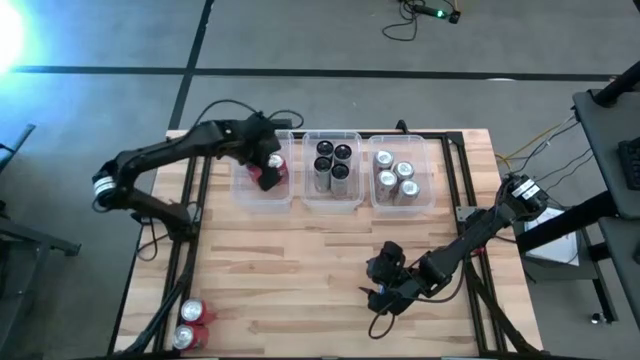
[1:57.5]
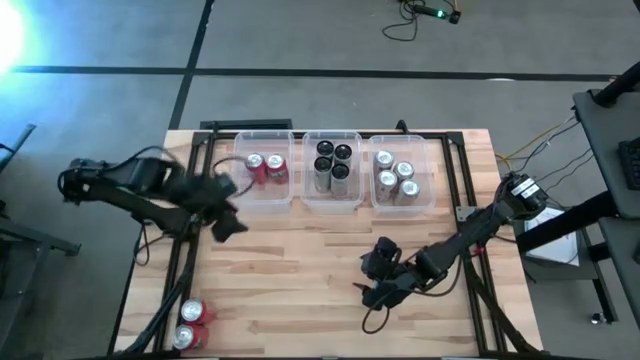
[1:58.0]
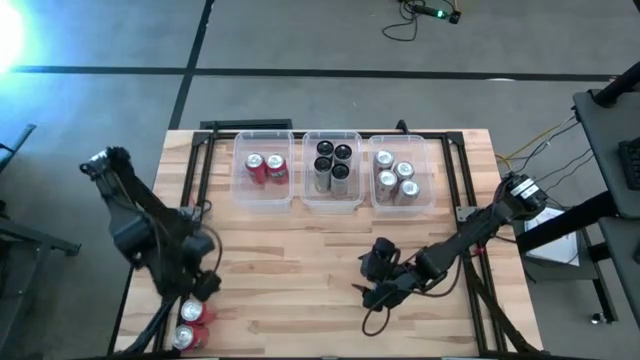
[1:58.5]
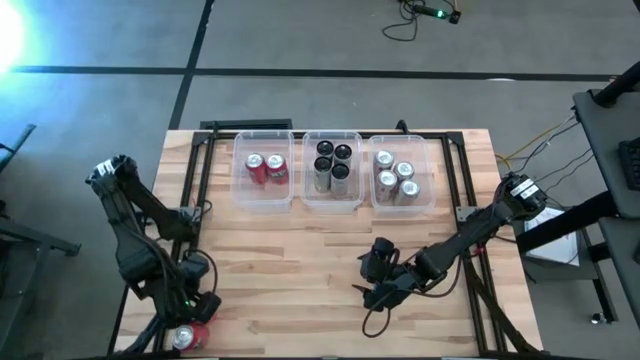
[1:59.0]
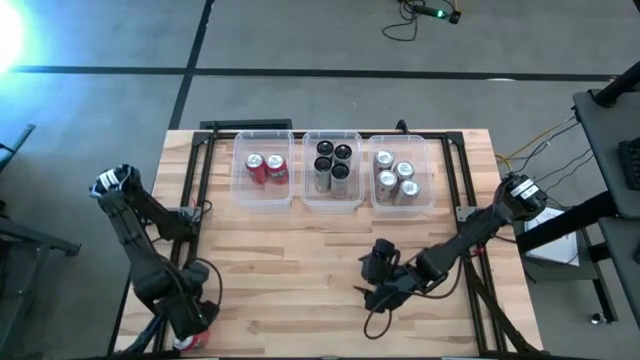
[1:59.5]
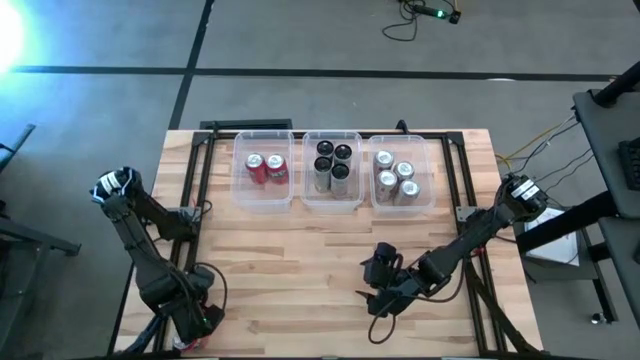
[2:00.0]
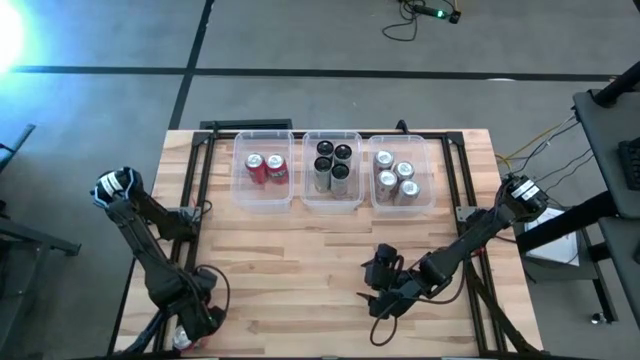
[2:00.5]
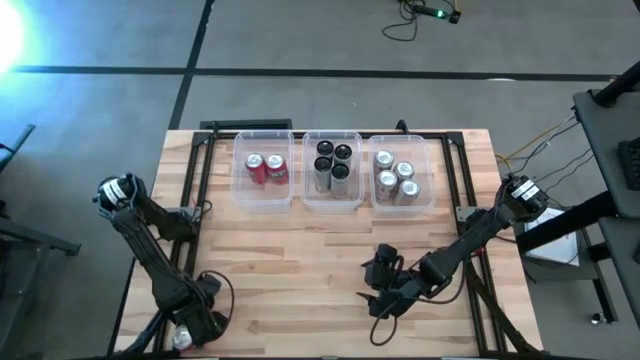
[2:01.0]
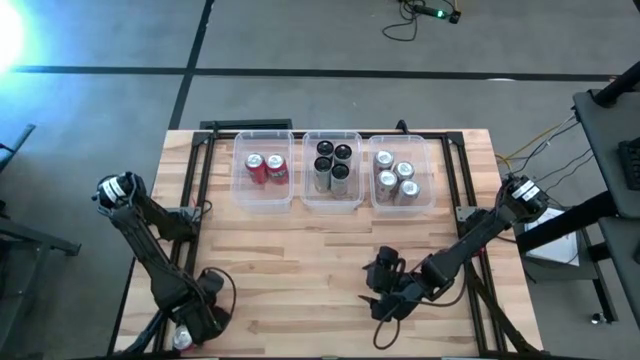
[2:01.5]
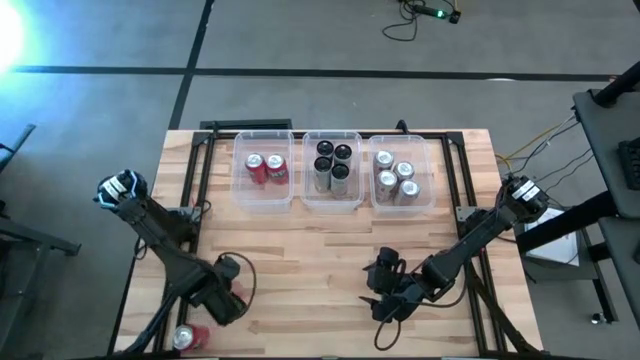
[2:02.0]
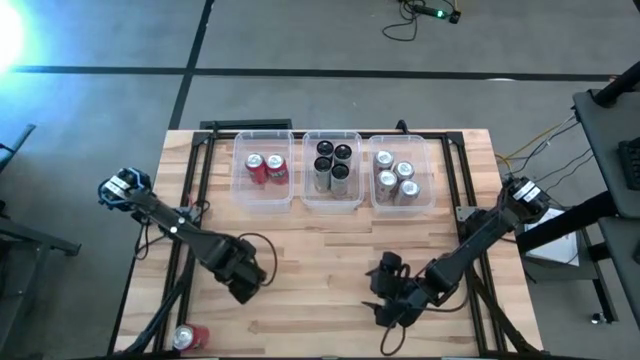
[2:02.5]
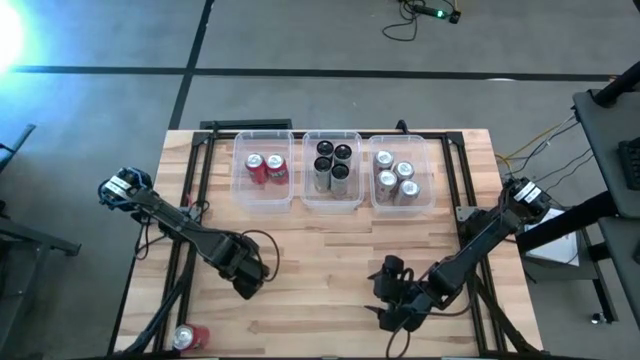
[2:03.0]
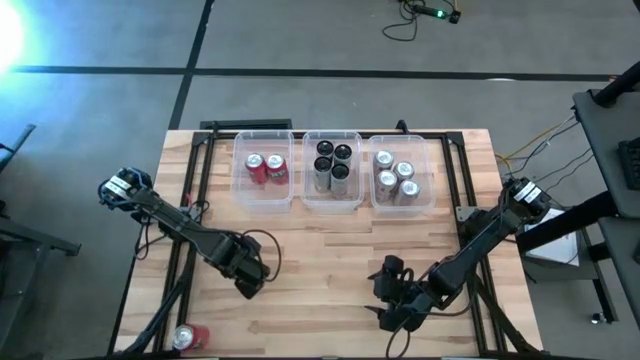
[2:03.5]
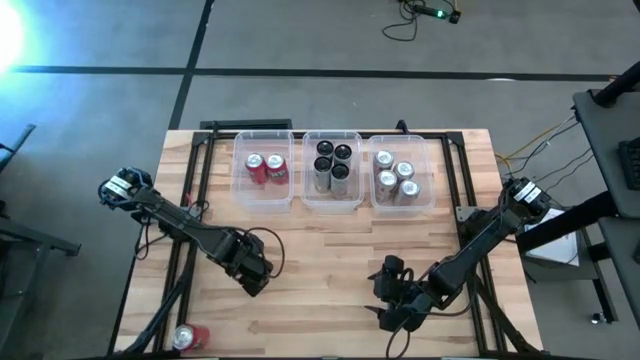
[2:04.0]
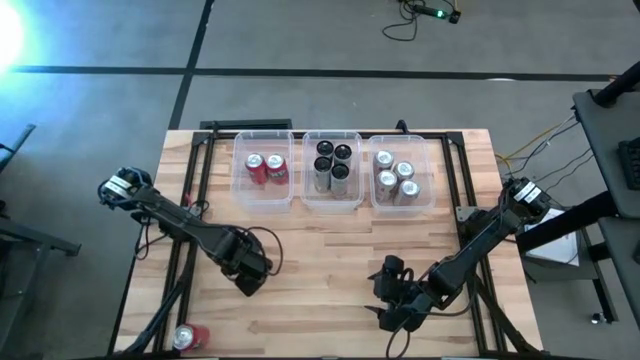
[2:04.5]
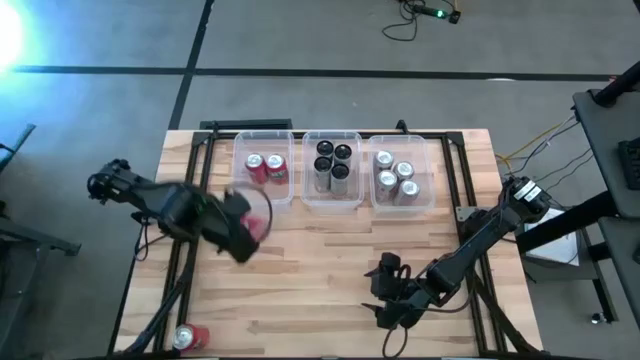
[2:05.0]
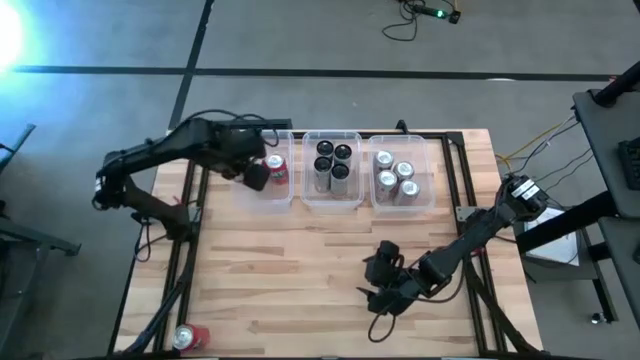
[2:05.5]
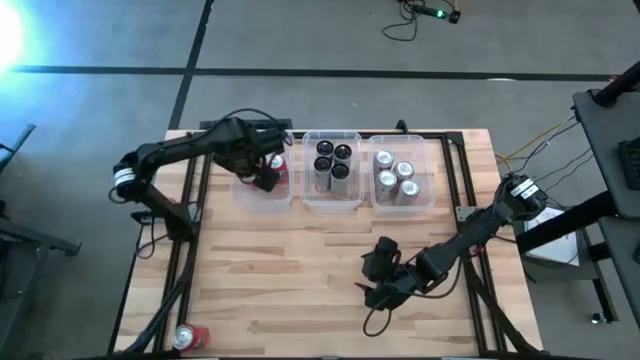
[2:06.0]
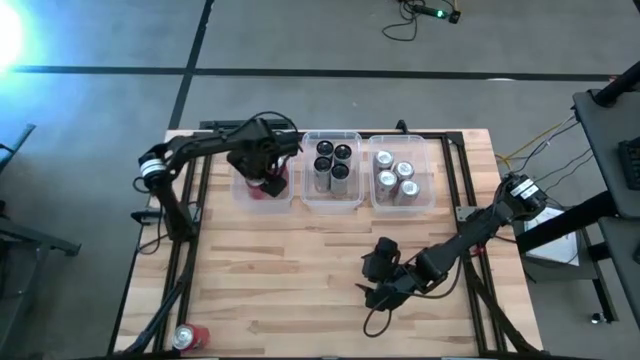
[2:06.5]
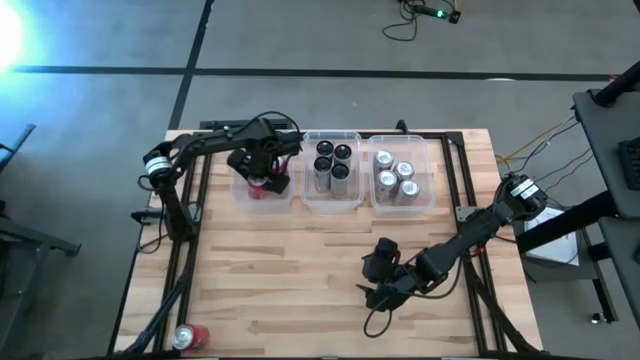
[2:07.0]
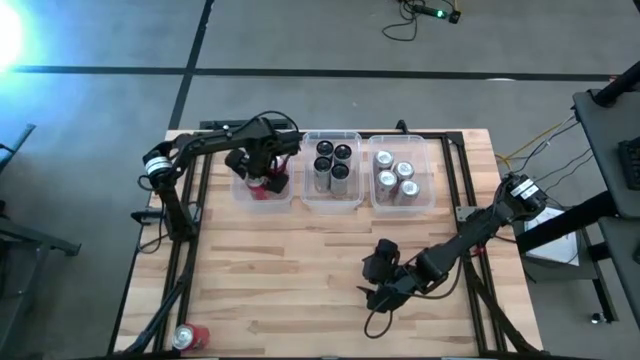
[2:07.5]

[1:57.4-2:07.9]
Task: Sort soda cans
Put the red soda can into the left transparent bin

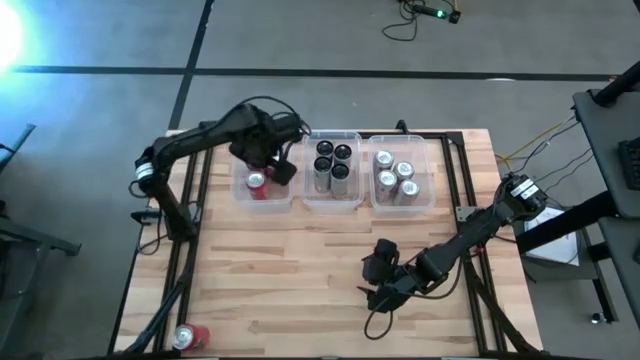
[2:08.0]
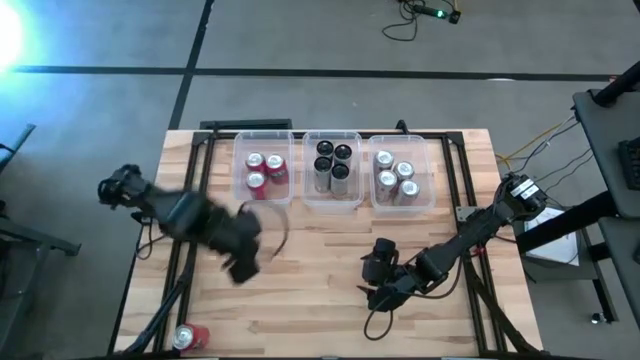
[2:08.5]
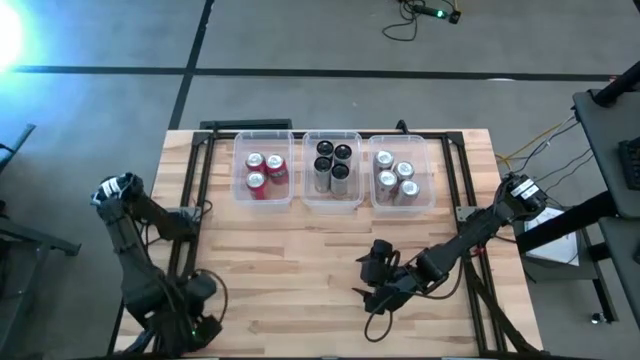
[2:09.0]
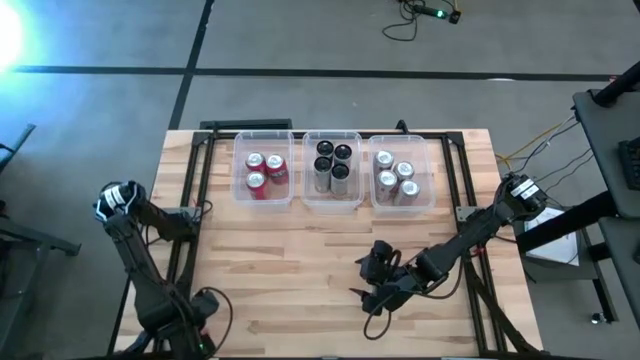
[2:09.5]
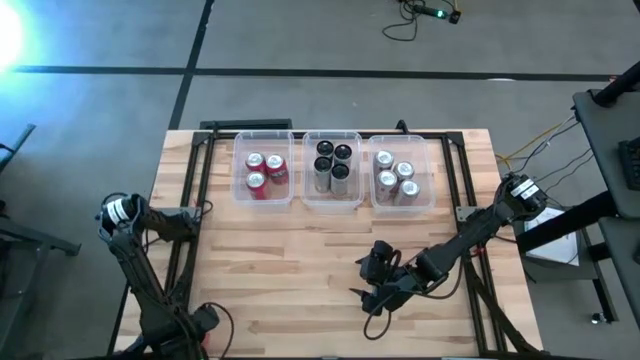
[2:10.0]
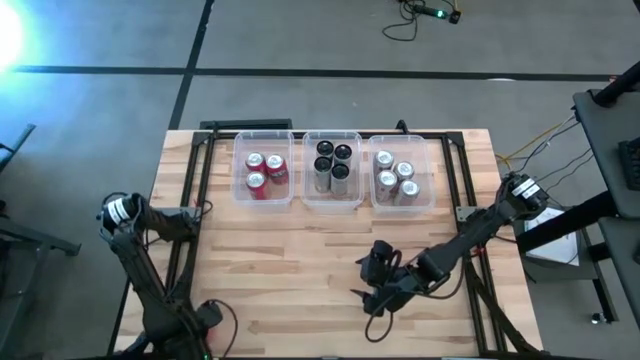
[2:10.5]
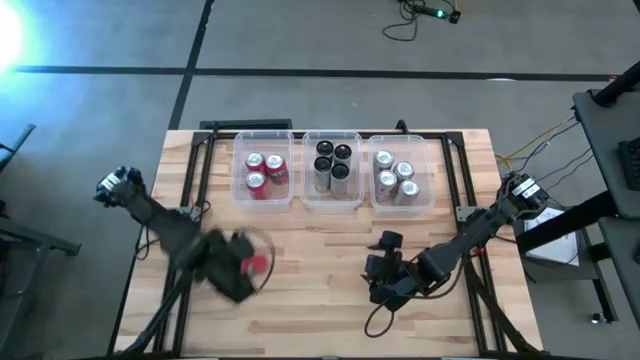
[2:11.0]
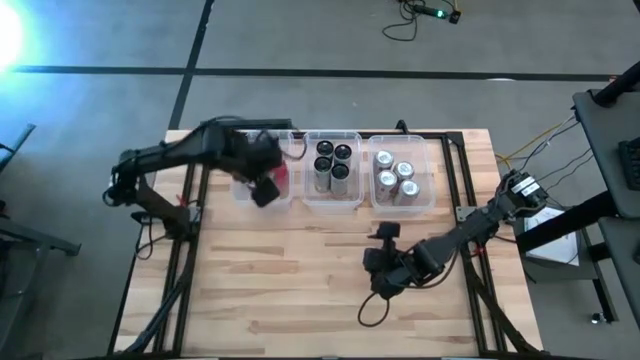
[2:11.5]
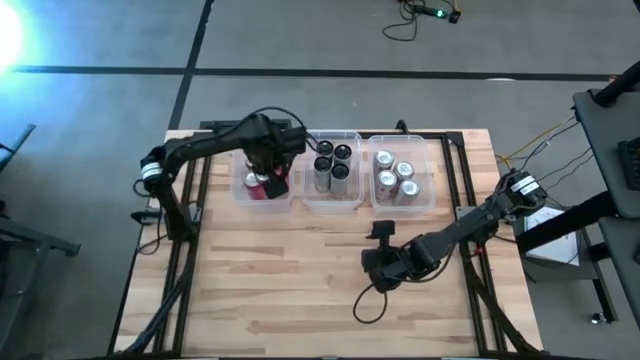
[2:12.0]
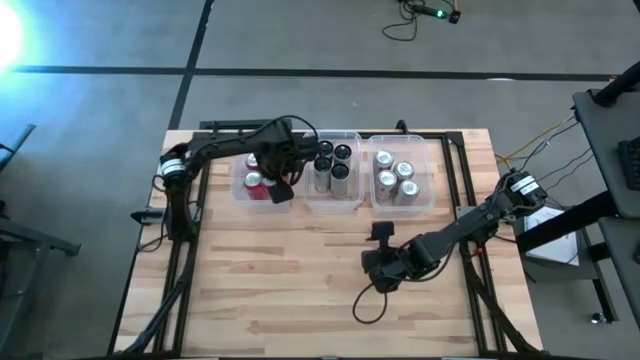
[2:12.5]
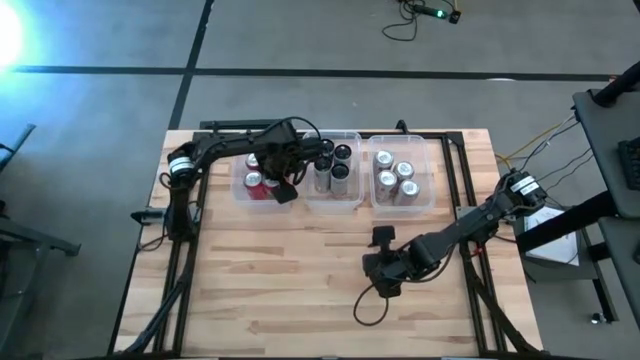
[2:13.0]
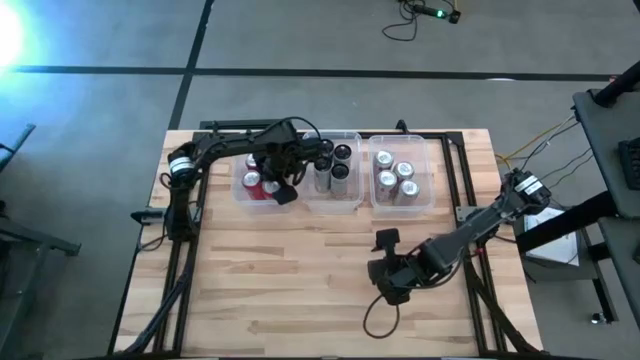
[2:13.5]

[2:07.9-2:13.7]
Put the red soda can into the left transparent bin

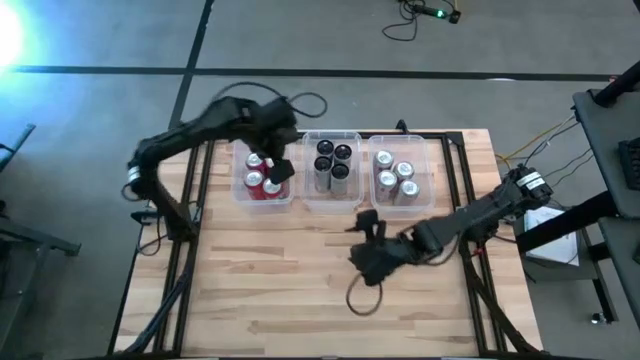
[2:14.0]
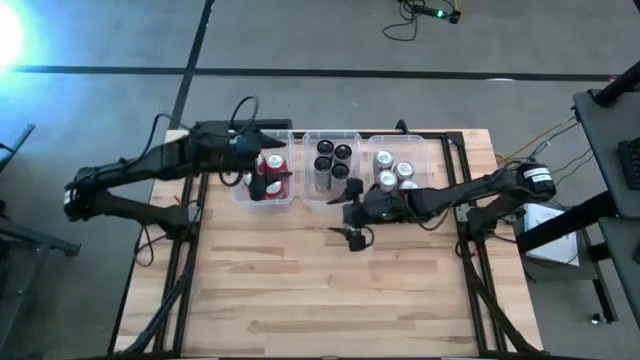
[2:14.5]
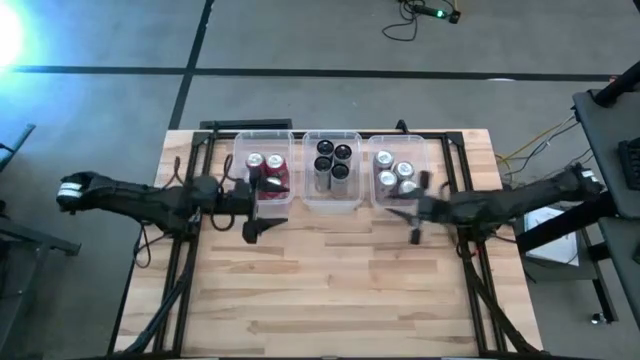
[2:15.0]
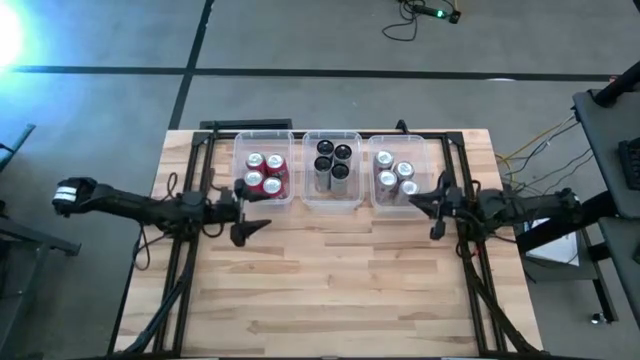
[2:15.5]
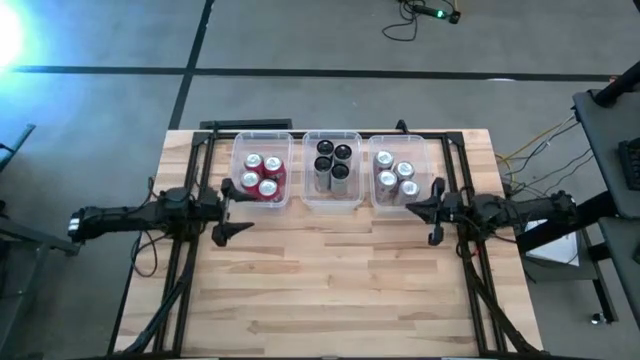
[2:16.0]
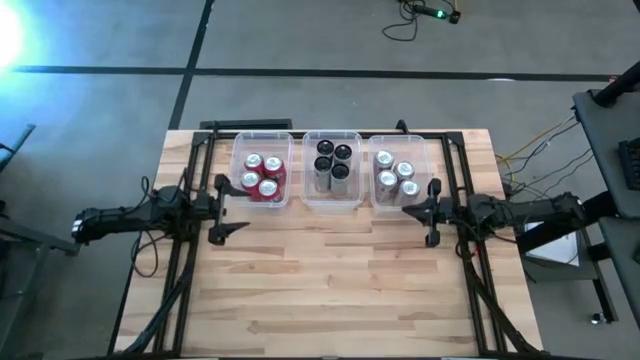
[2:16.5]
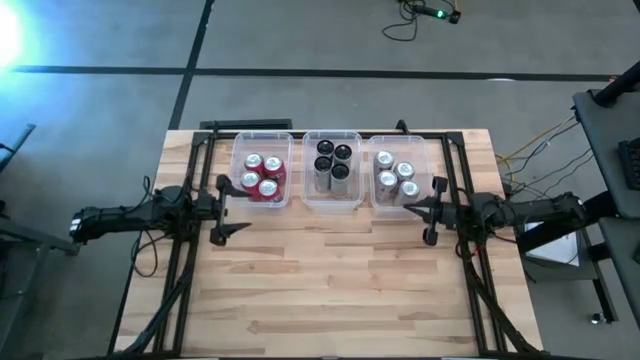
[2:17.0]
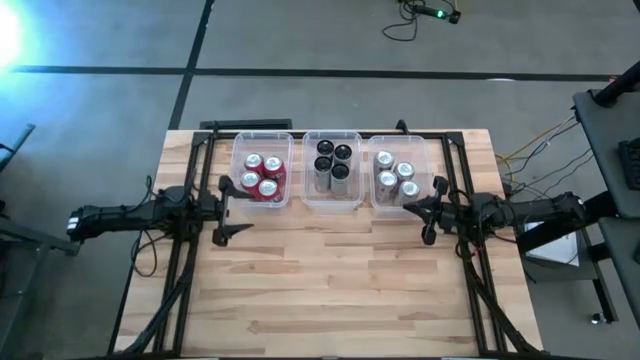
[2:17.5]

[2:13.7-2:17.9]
Return to Home Position
